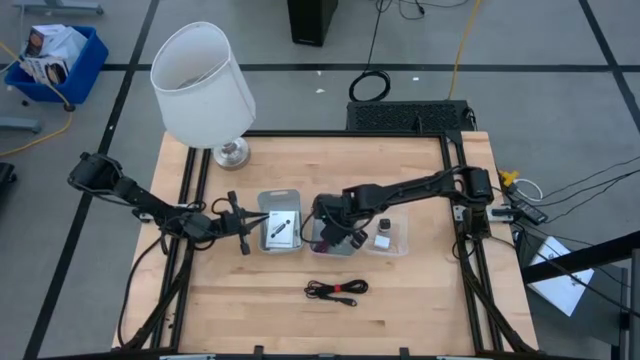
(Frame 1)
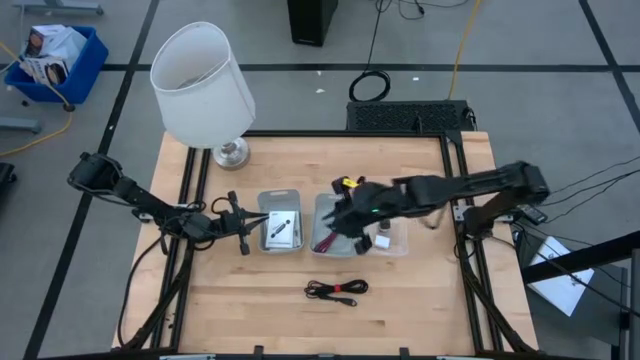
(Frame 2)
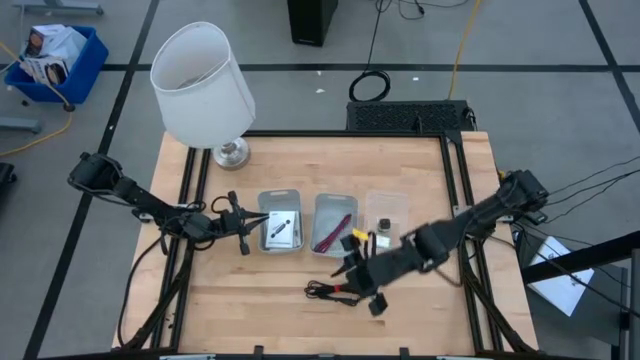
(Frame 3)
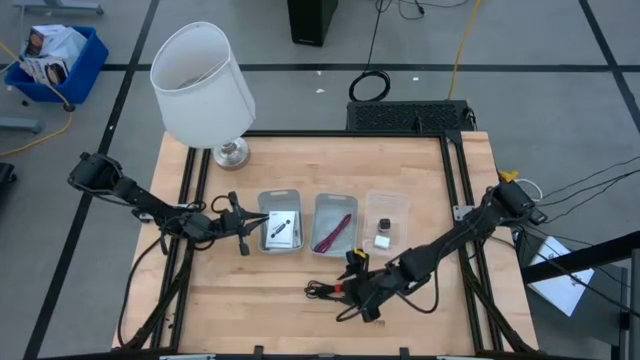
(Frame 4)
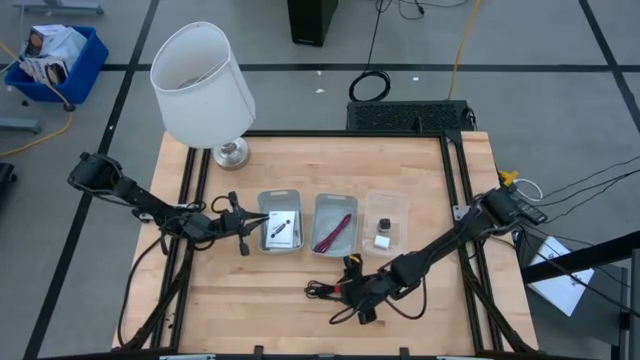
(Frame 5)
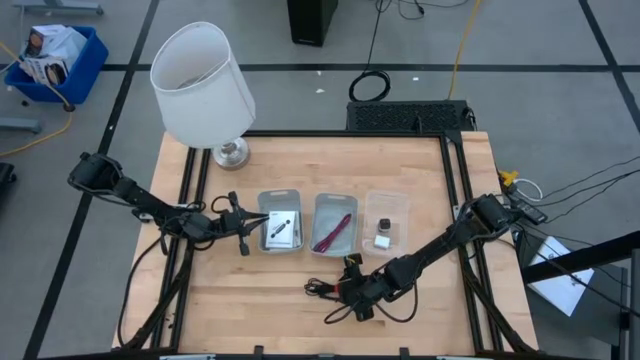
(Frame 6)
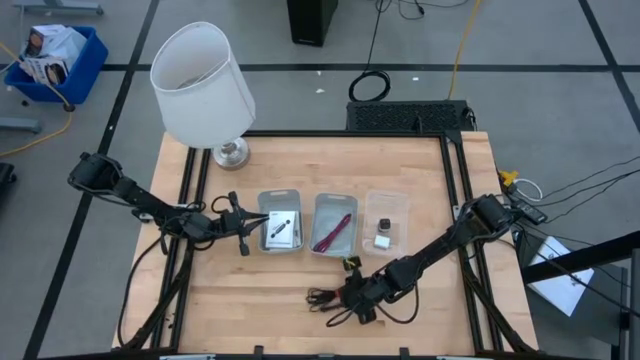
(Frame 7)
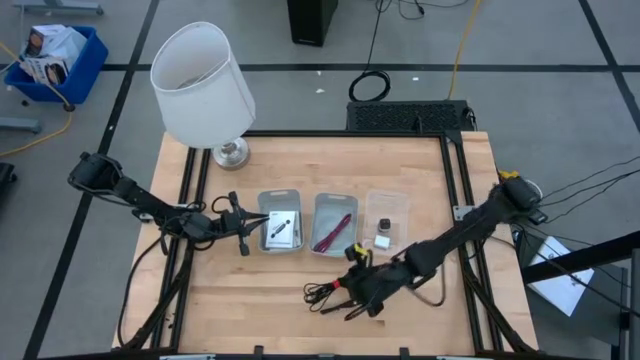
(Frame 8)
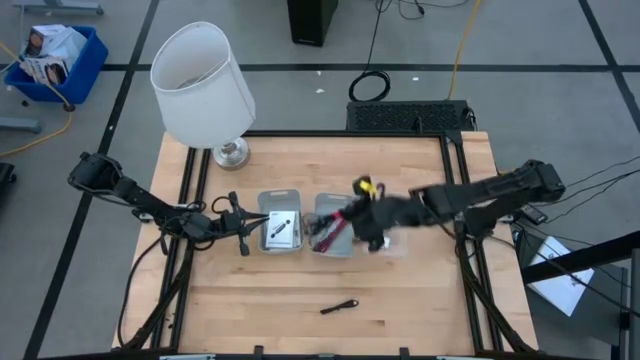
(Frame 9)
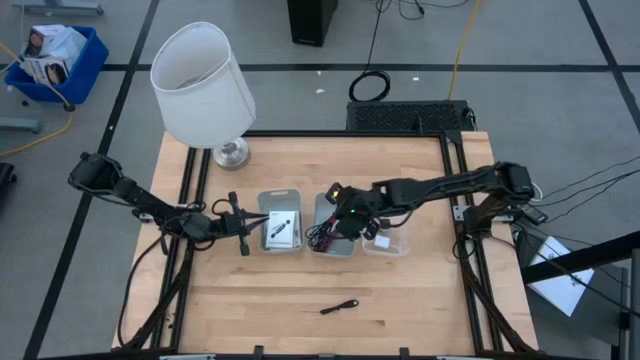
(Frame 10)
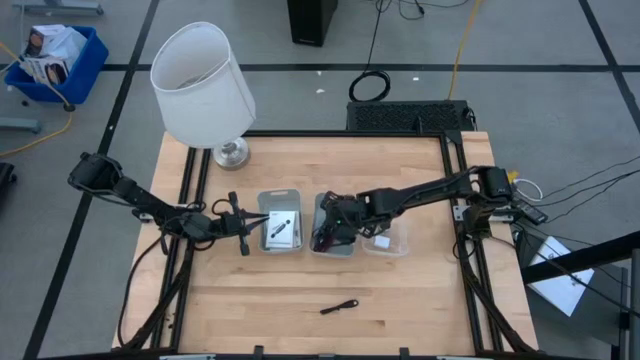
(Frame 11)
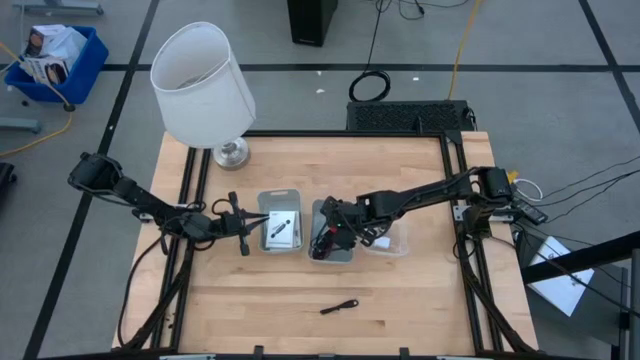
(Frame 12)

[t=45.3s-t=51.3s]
Task: Pick and place items into bin
Put the top black charger cable into the right gray bin

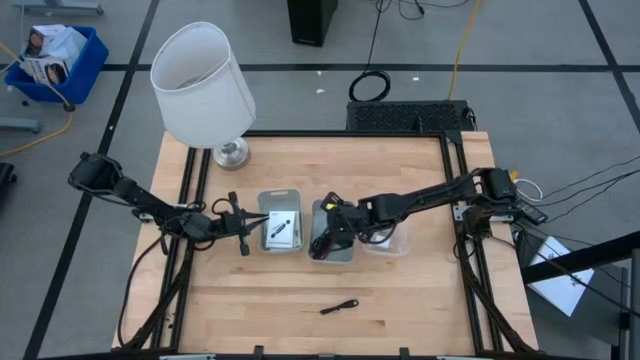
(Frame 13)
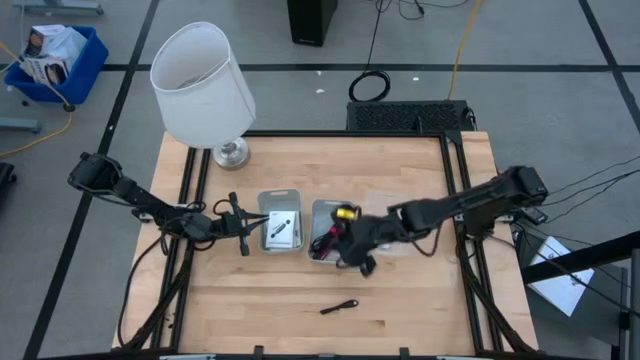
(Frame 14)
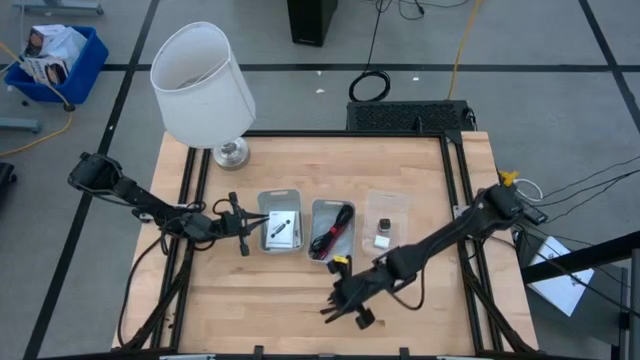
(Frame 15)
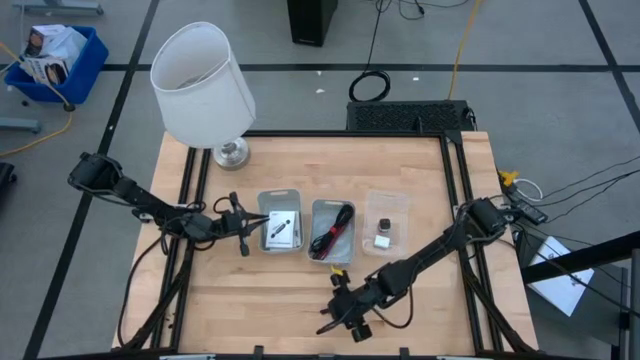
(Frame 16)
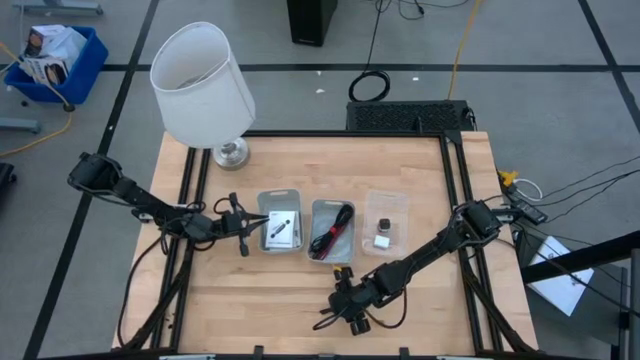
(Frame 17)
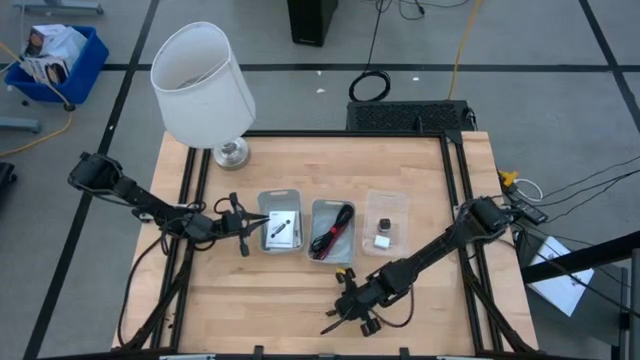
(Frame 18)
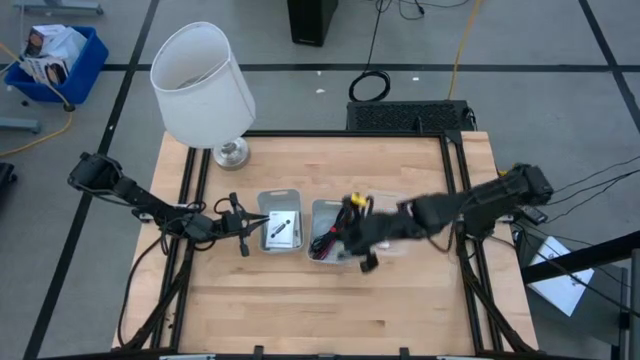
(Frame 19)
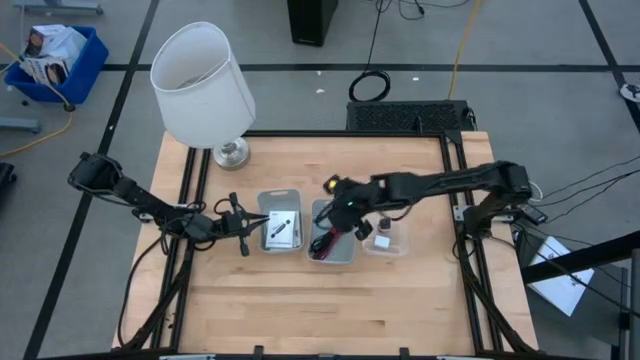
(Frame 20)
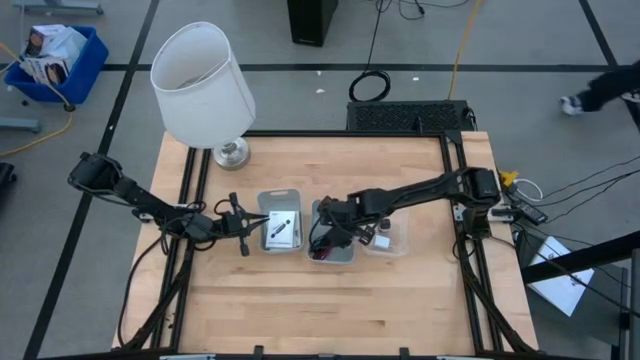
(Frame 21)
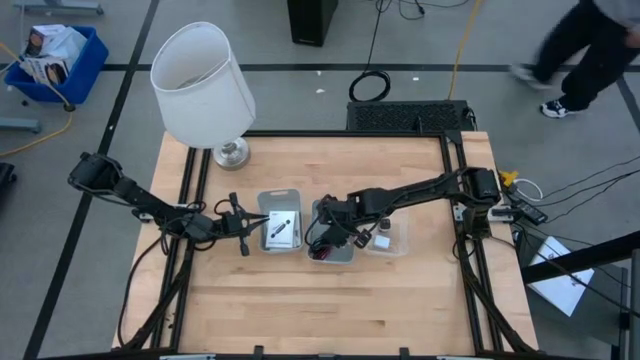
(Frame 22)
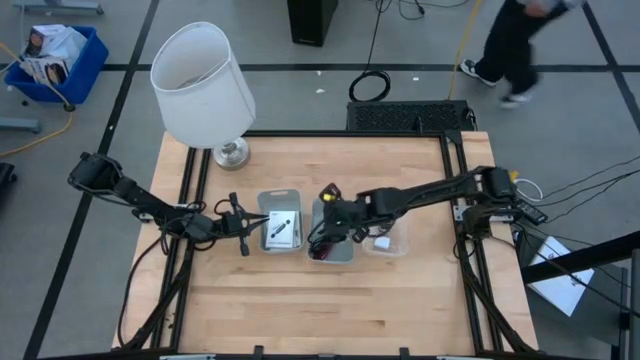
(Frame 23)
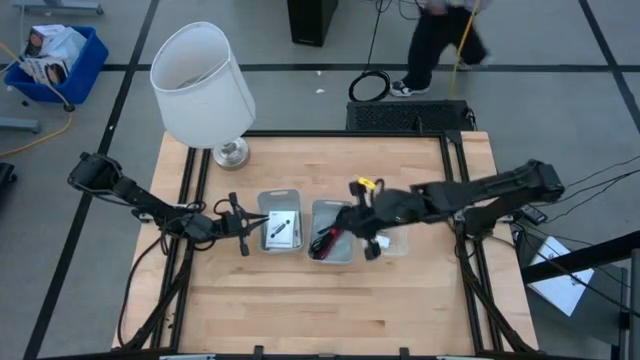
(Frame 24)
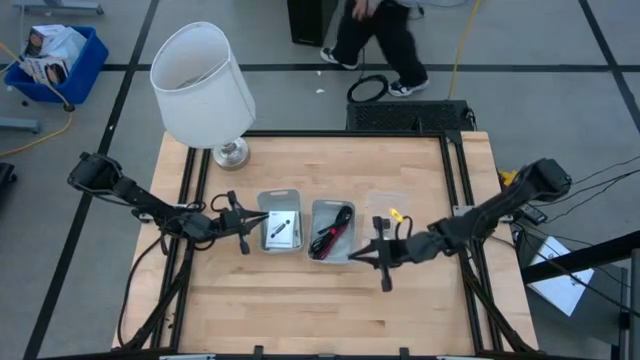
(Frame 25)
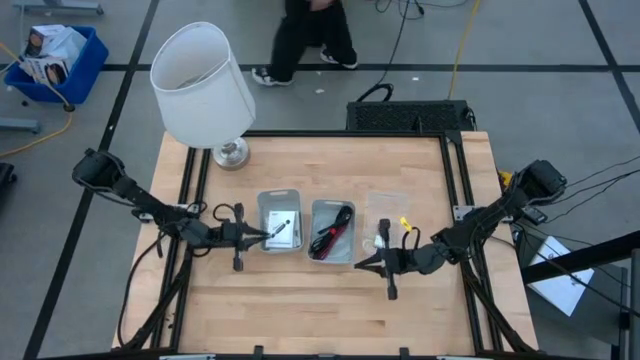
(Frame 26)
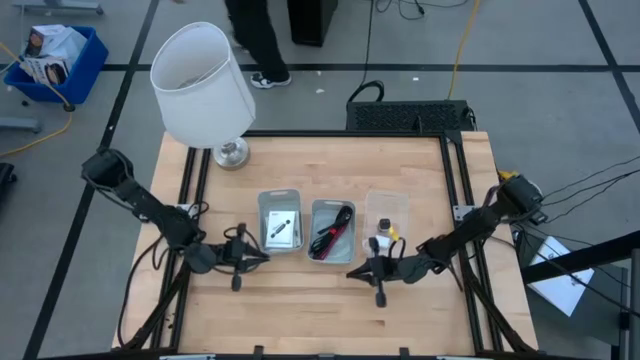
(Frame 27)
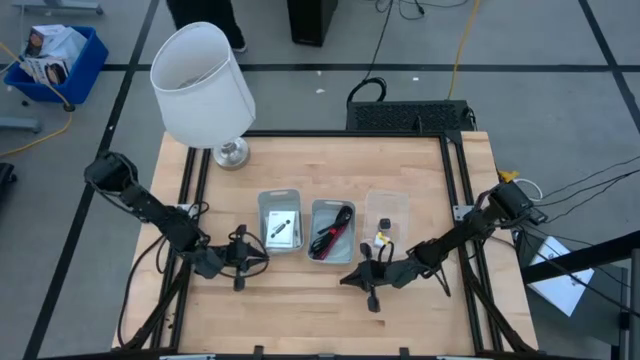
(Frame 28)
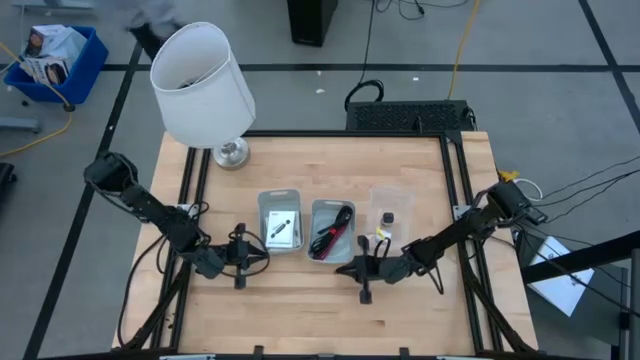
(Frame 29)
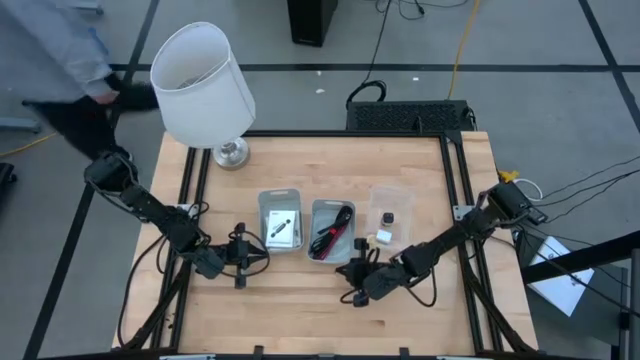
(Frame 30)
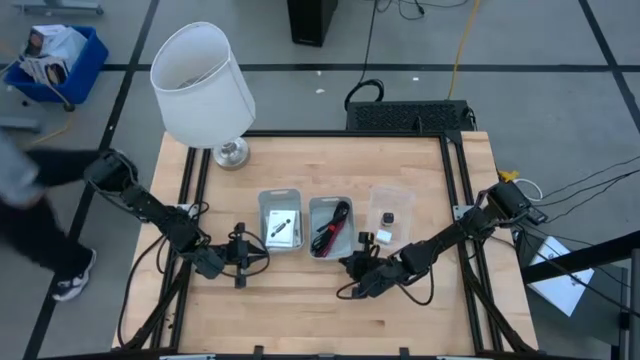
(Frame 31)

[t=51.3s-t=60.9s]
Put the black charger cable into the right gray bin

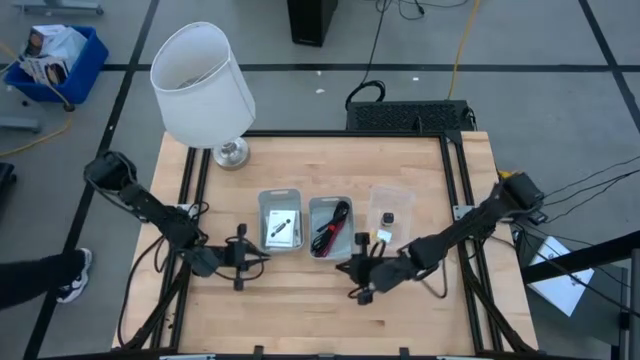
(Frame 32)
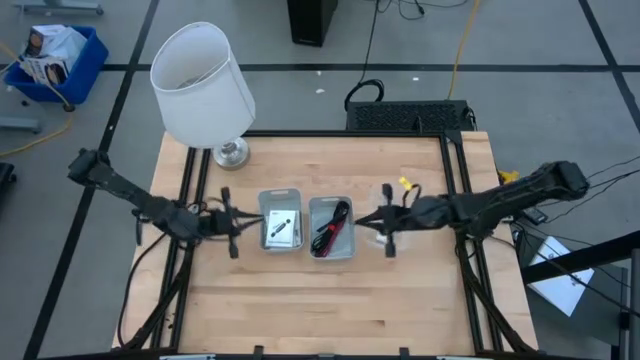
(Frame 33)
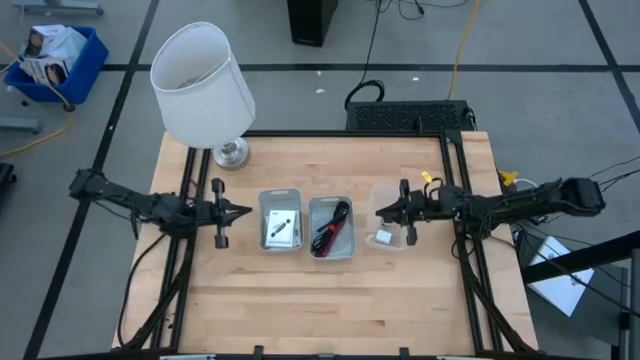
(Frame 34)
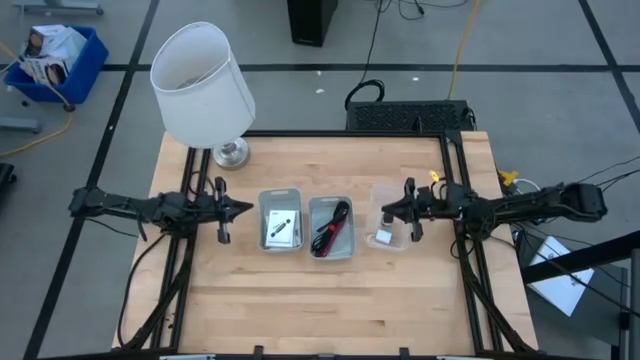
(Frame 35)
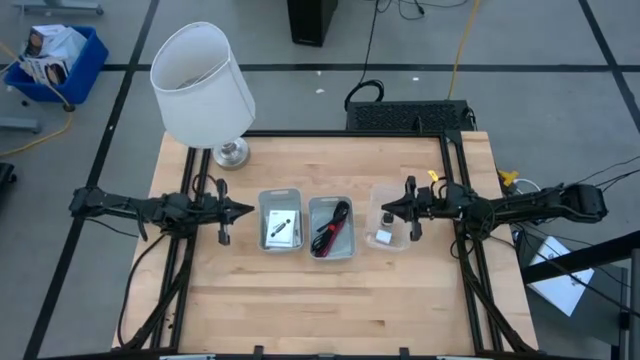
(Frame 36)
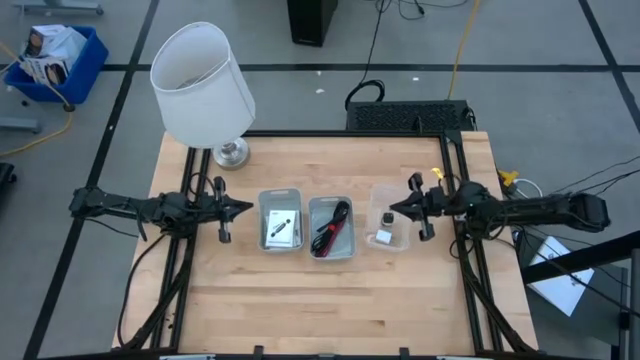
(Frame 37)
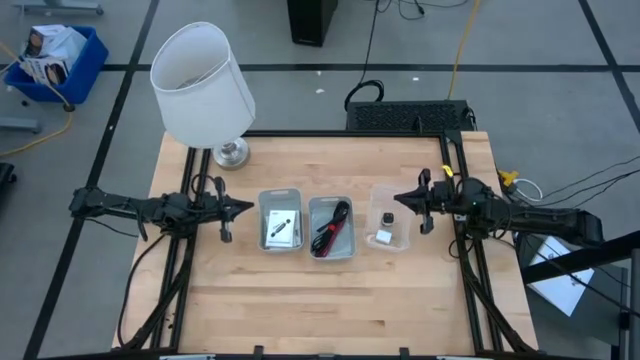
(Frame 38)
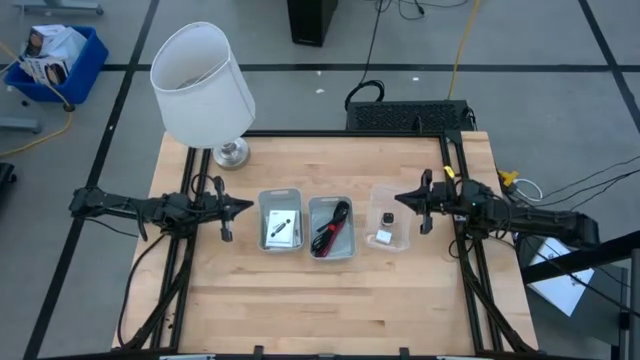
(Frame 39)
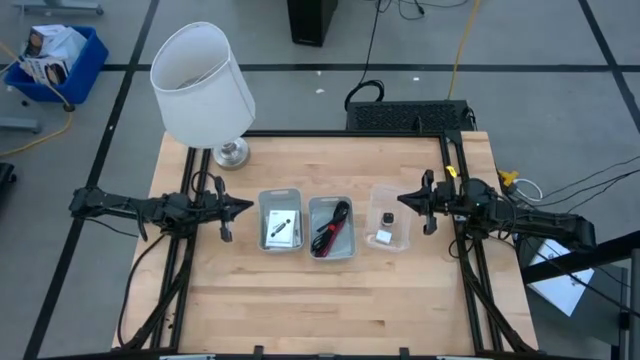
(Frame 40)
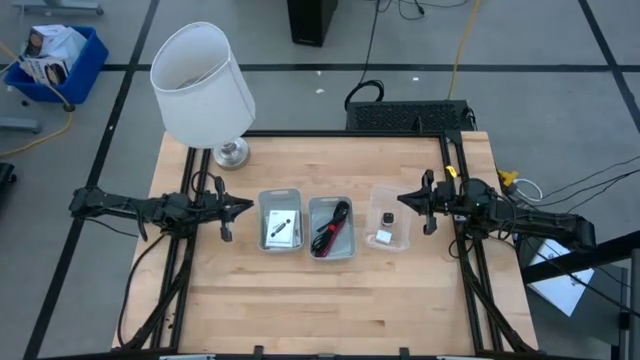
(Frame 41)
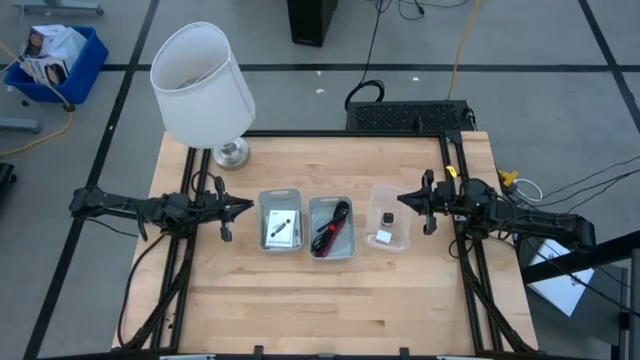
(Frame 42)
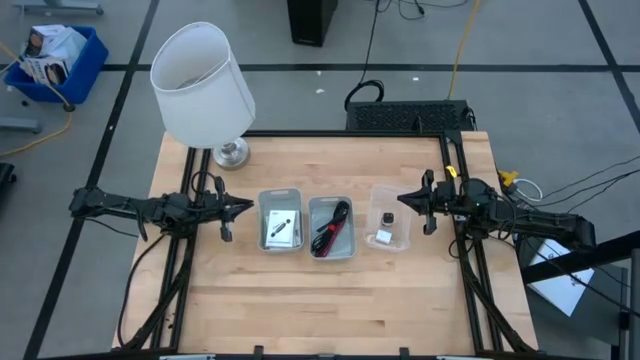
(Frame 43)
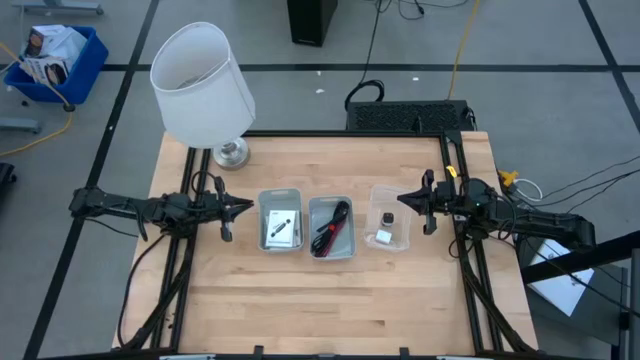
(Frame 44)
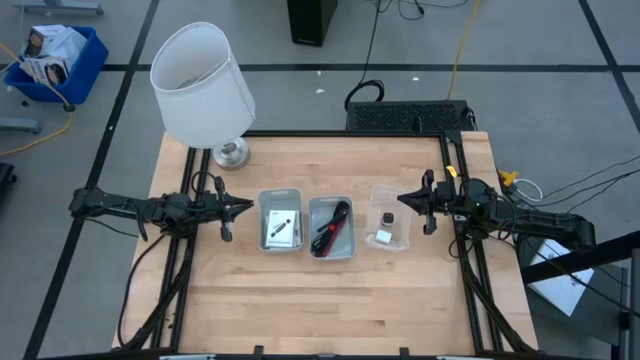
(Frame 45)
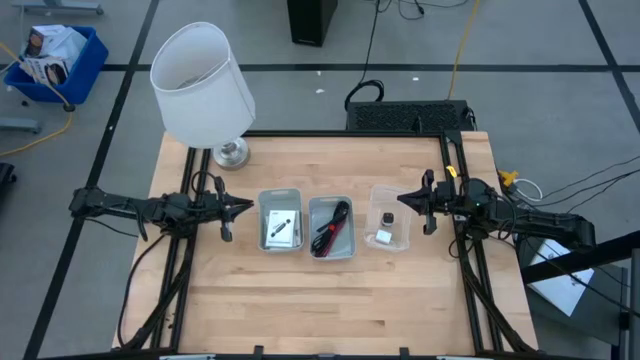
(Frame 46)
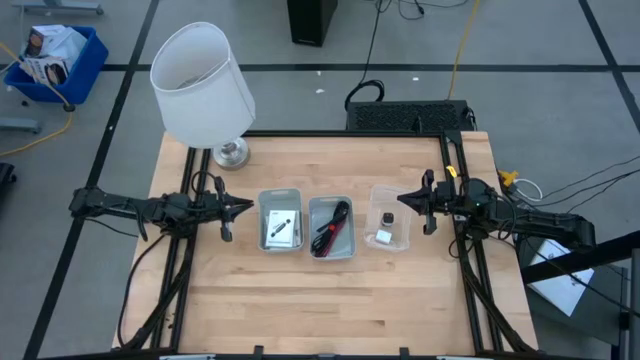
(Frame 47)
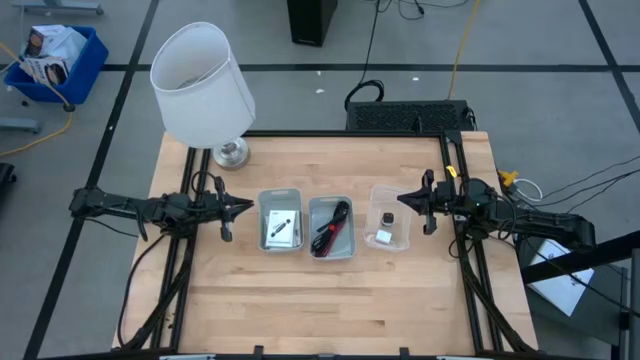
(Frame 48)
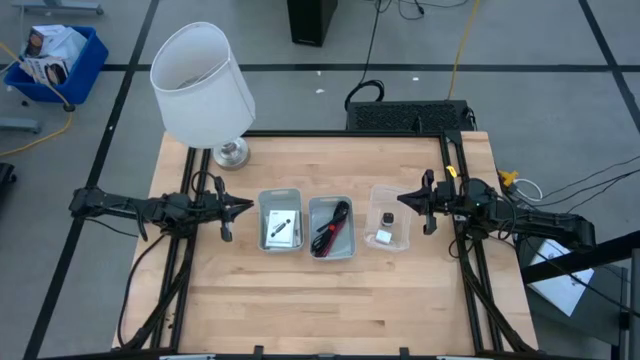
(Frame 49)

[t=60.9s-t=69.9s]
Return to Home Position
